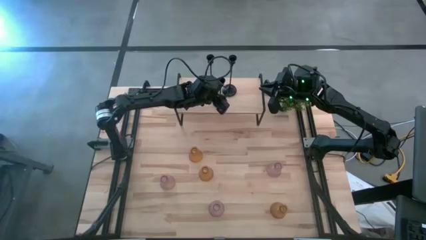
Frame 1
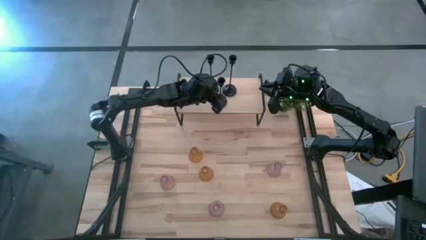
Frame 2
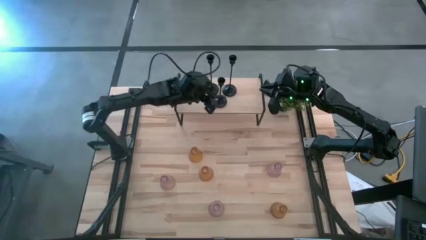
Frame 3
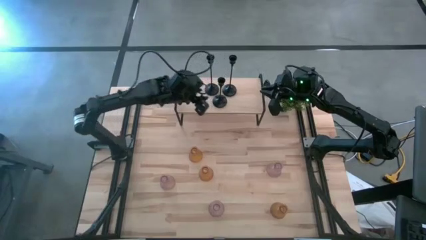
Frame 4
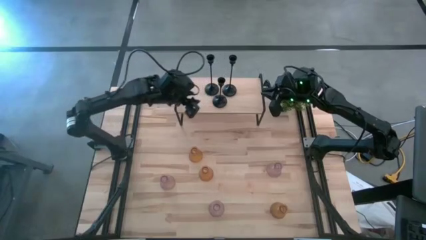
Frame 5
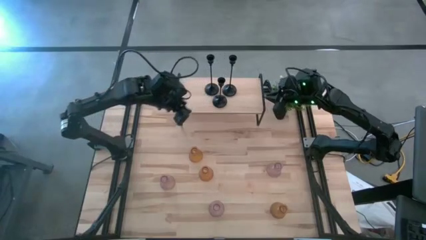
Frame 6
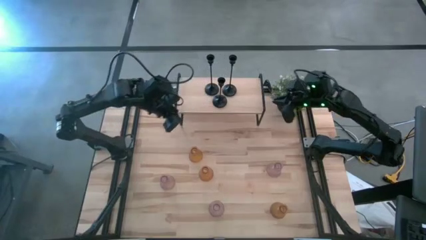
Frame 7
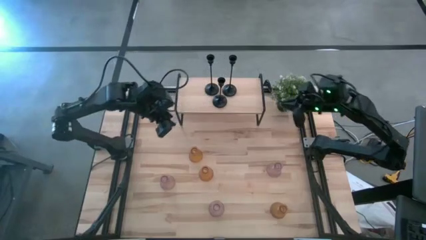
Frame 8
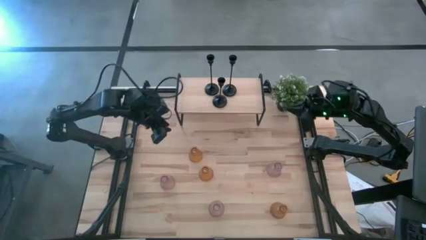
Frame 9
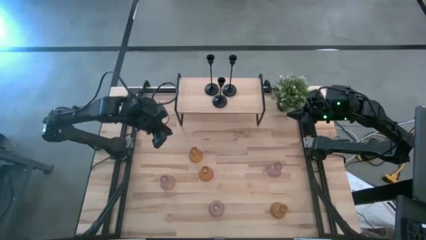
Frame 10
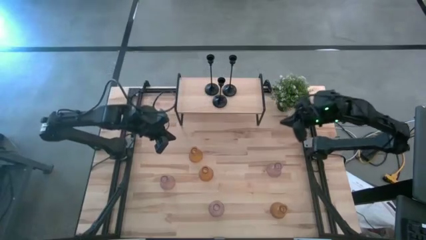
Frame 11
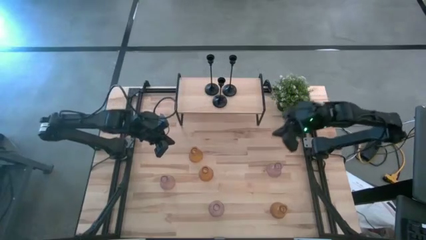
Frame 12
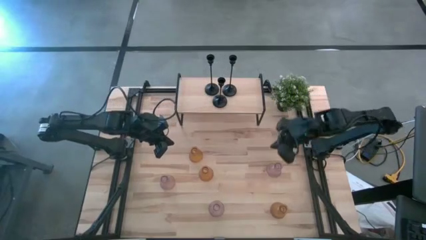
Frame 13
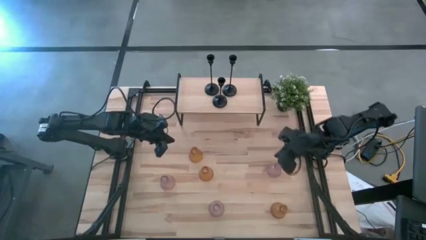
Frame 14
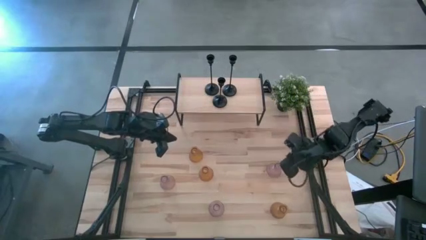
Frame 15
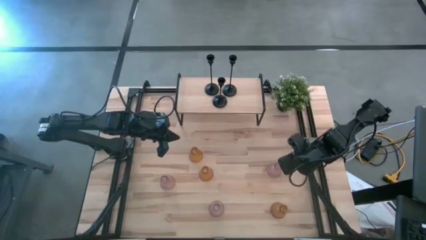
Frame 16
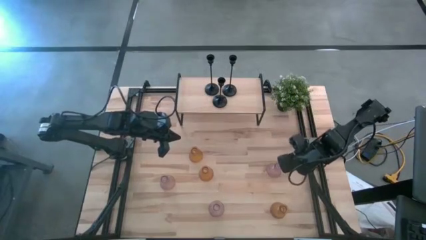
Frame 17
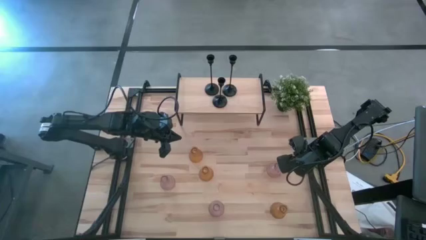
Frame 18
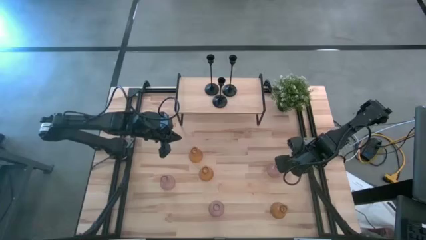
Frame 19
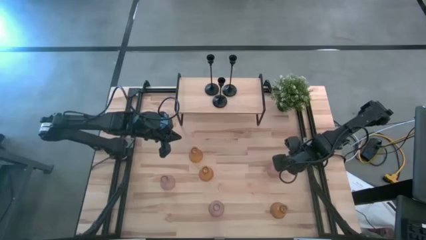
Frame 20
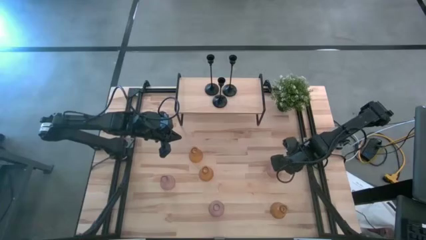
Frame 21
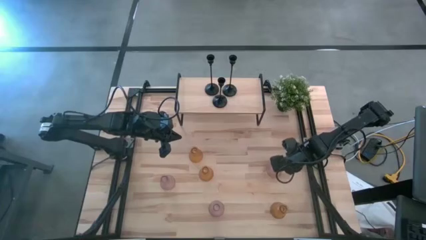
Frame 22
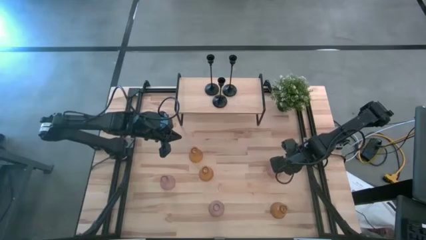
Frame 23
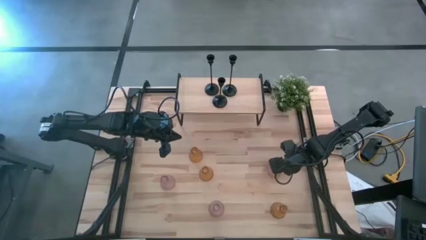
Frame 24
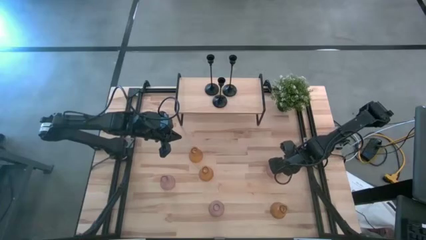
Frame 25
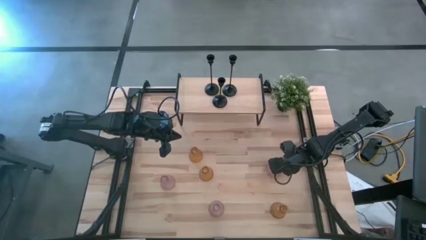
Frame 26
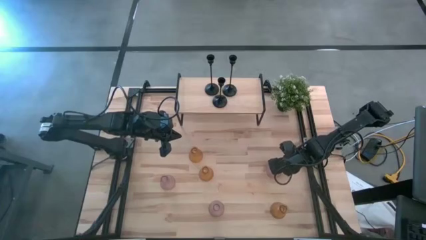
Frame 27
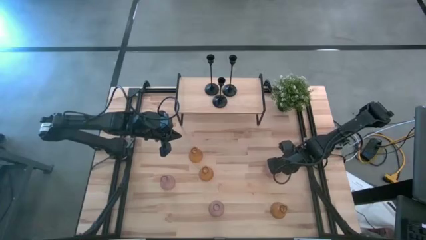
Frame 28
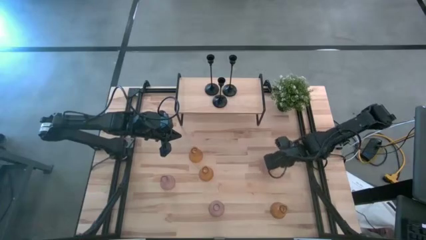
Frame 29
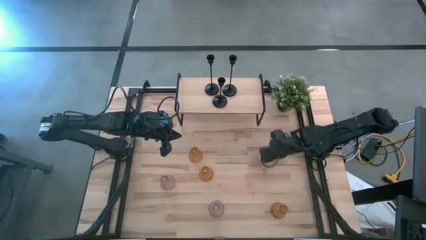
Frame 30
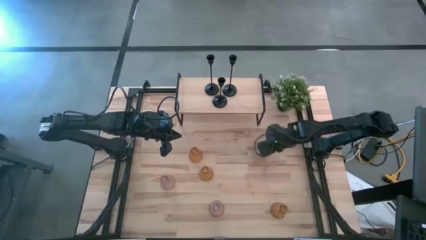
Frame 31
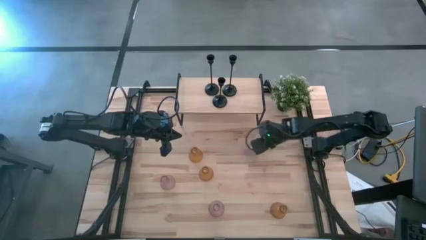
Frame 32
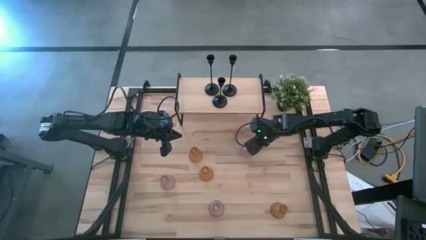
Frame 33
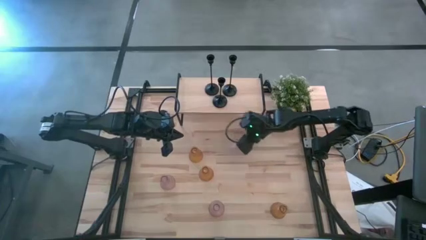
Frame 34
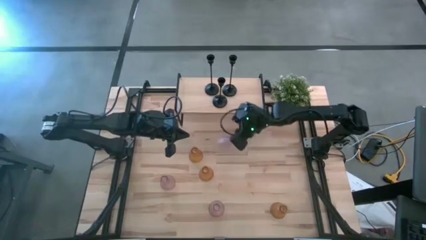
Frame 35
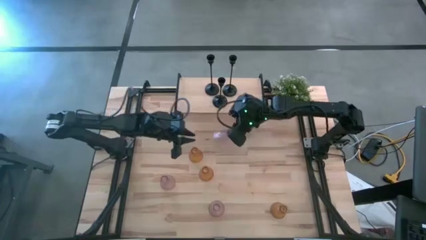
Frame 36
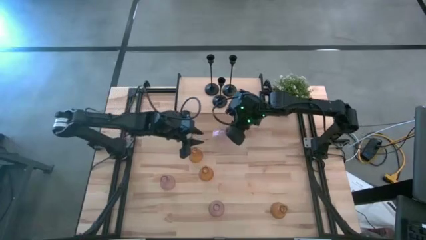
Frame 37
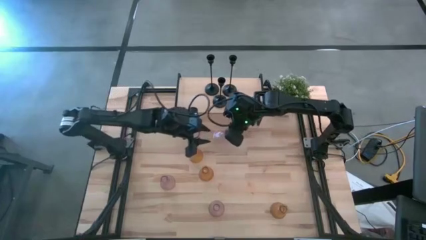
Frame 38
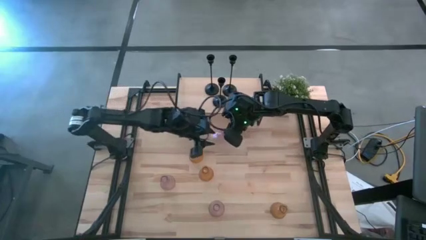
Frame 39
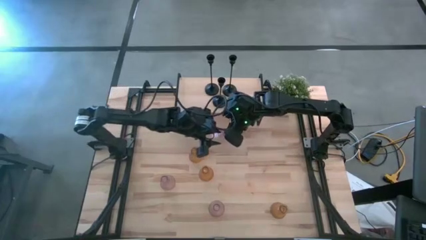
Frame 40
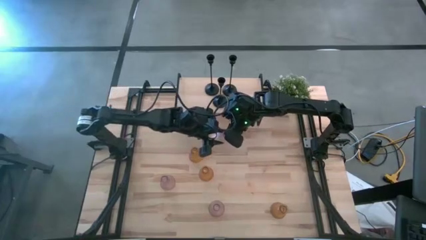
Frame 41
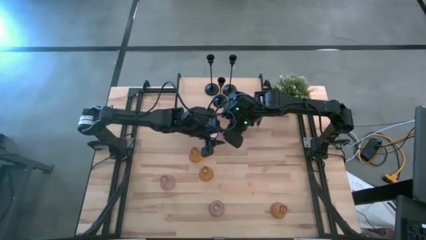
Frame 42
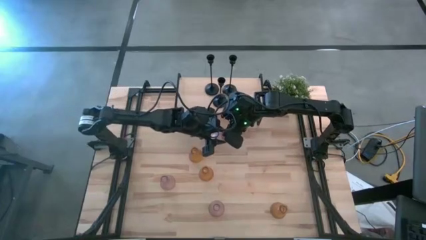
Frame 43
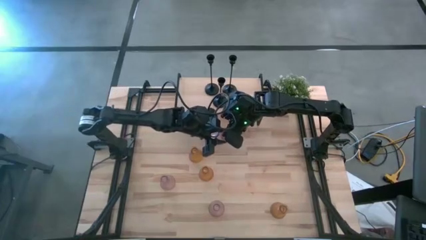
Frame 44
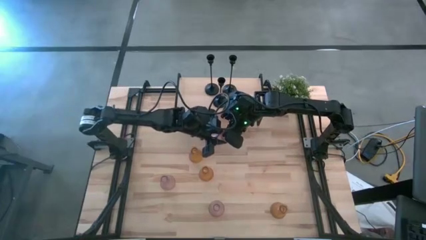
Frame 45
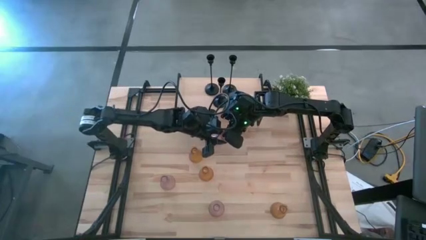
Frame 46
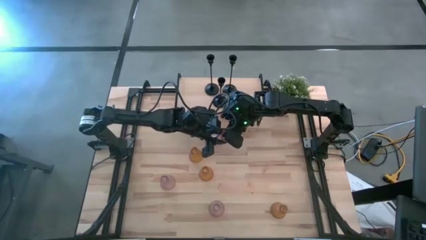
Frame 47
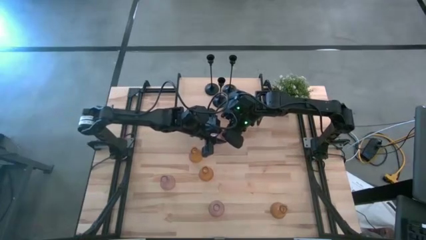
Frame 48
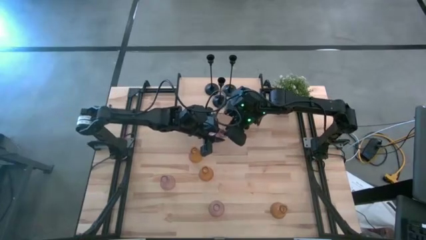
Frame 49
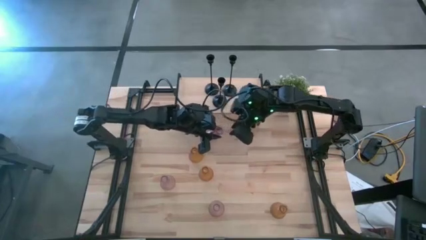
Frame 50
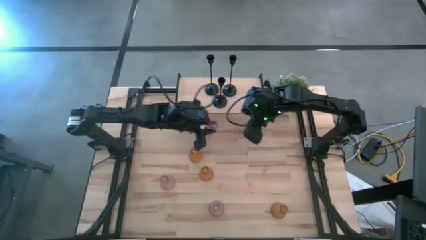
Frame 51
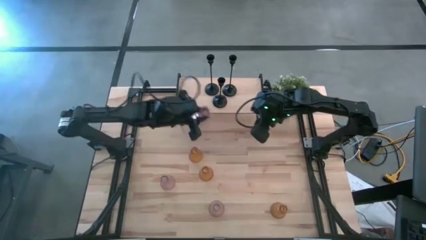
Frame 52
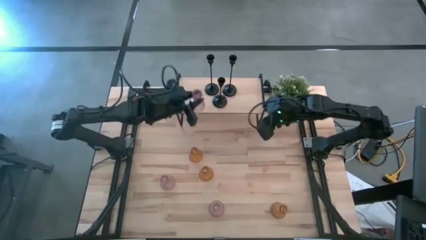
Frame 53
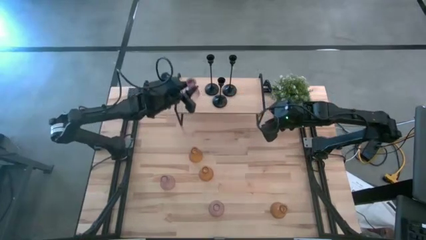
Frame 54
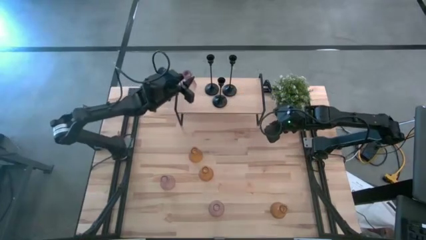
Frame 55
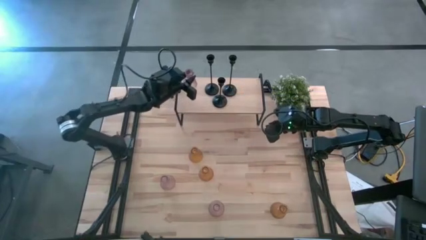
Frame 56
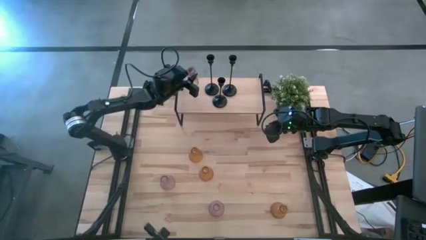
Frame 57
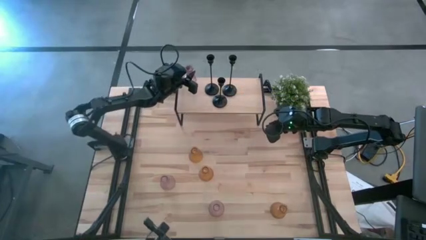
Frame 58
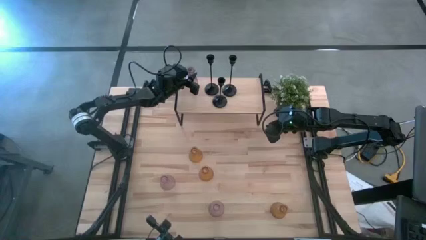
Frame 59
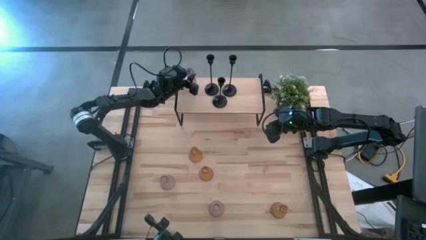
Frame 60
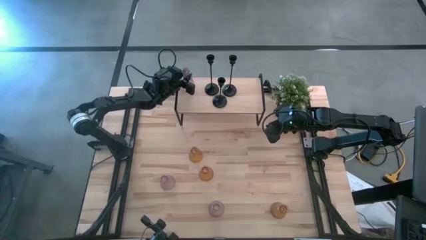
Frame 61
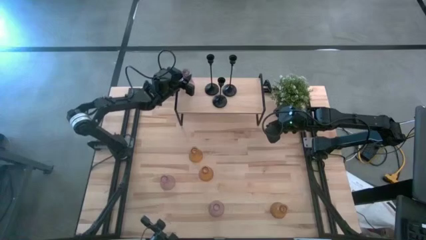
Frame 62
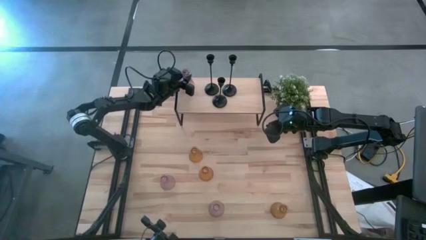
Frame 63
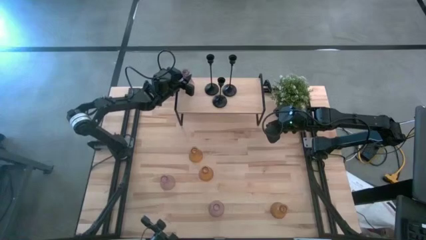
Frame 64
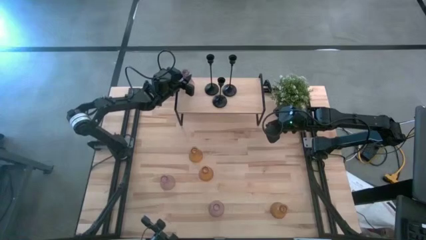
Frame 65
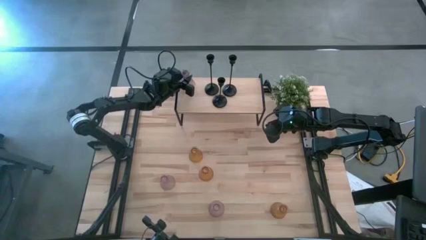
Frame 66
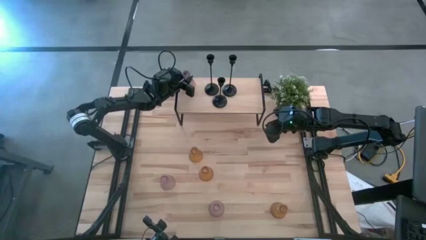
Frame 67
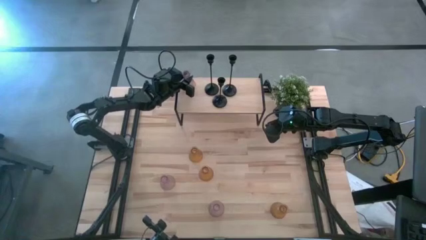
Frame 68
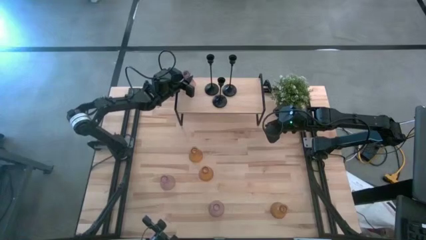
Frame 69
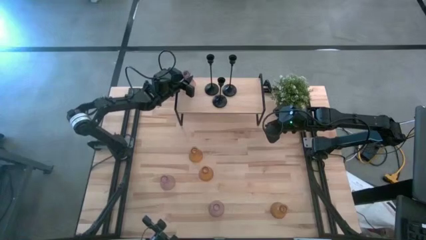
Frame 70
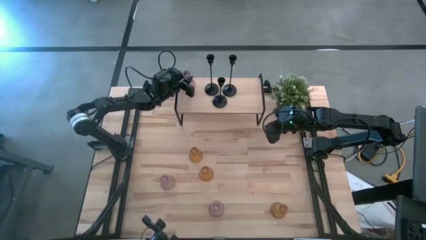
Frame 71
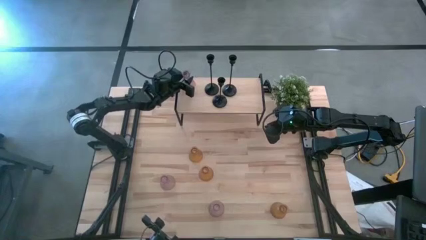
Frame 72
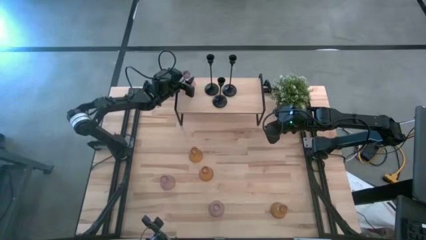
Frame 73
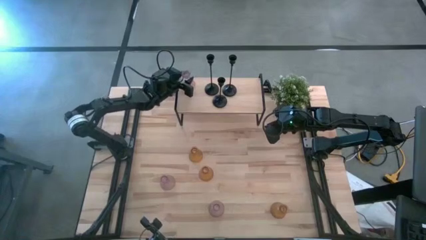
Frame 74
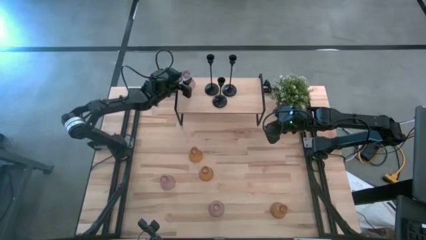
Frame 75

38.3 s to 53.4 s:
Task: Pick & Place candle stick holders
Put the top right pink glass candle holder on the shelf
